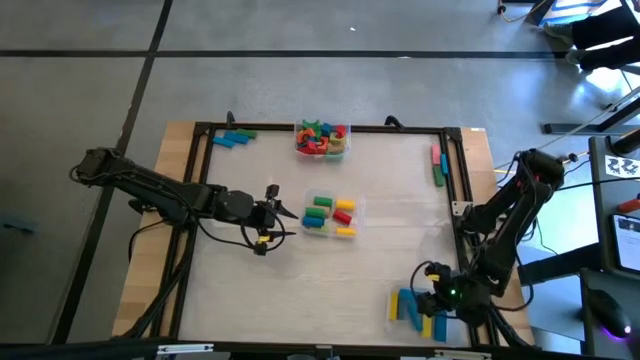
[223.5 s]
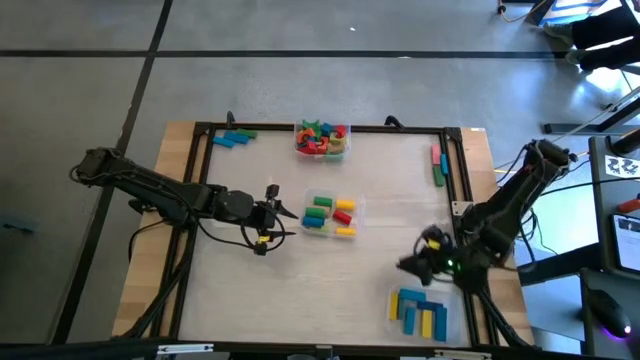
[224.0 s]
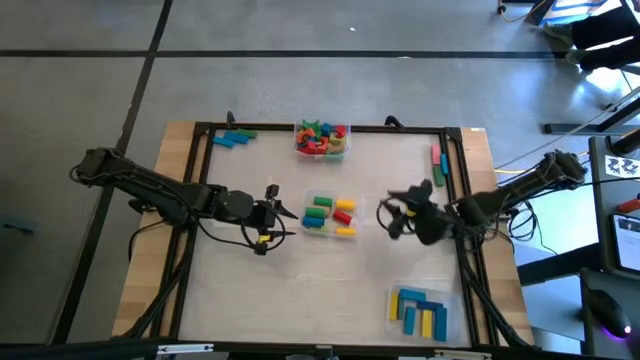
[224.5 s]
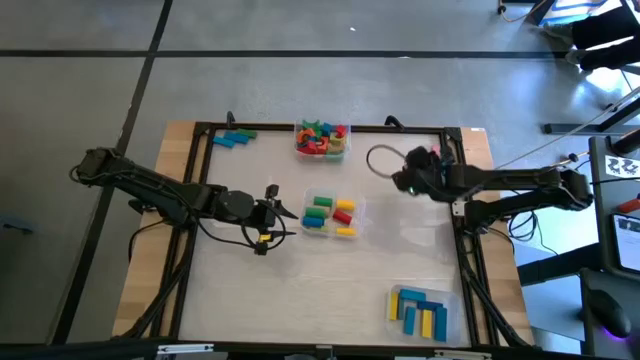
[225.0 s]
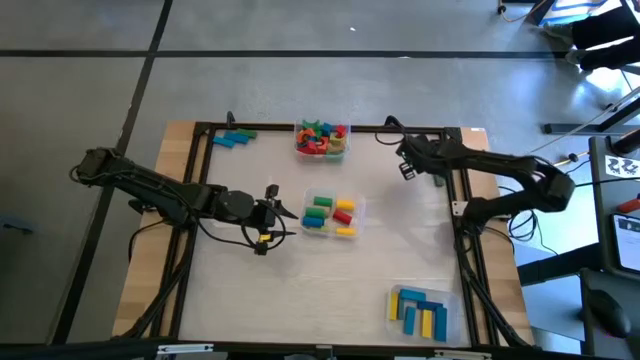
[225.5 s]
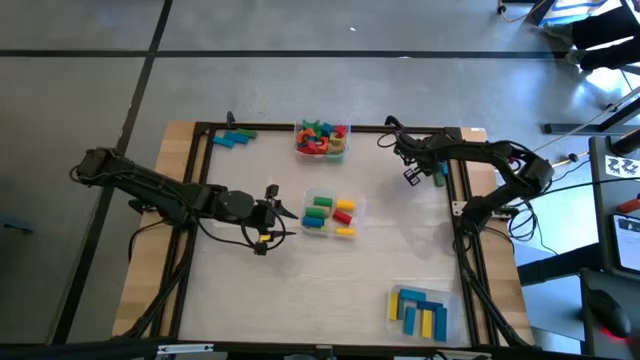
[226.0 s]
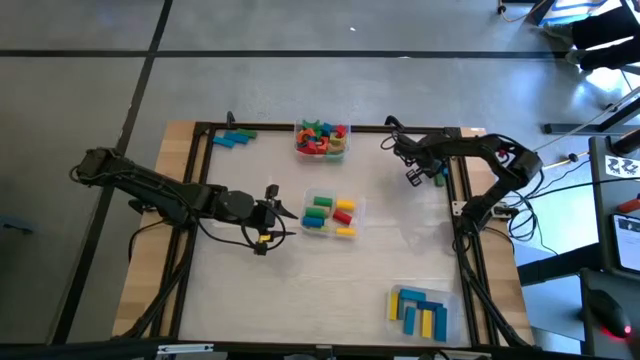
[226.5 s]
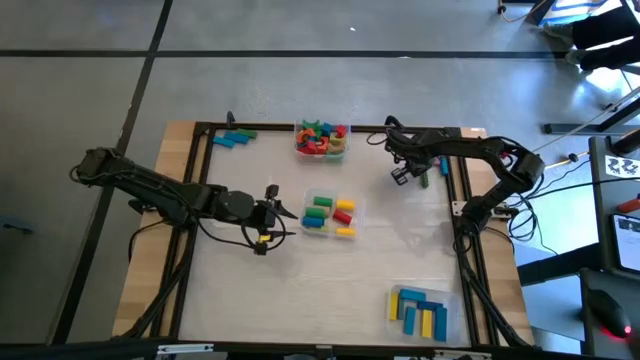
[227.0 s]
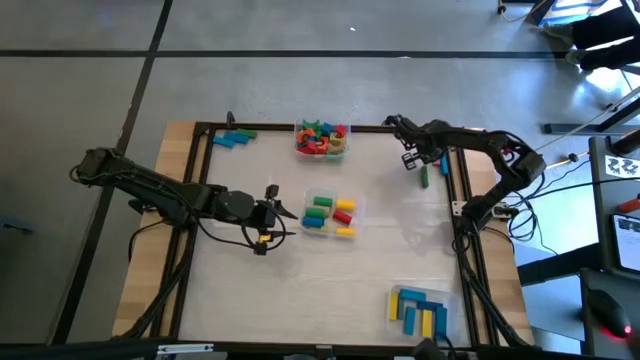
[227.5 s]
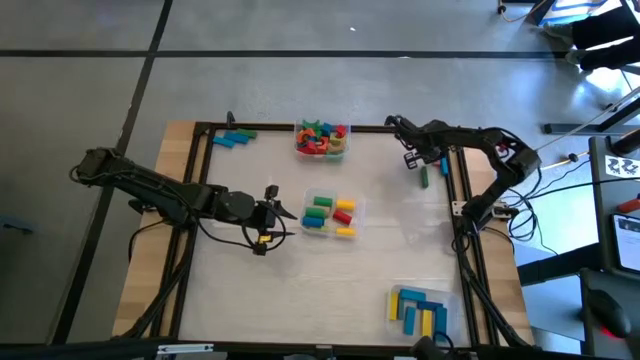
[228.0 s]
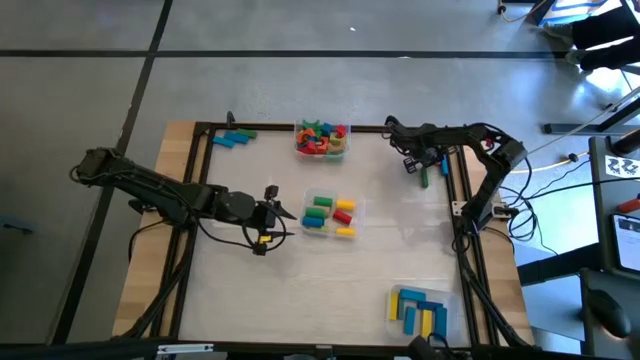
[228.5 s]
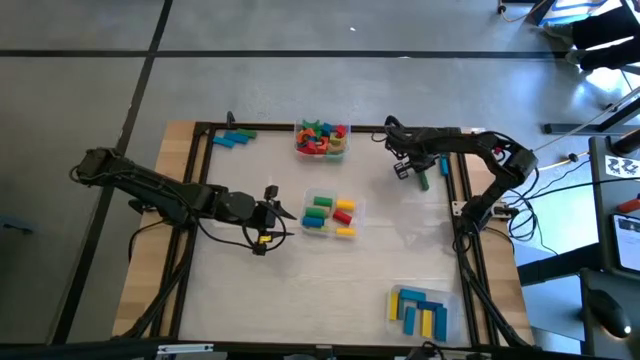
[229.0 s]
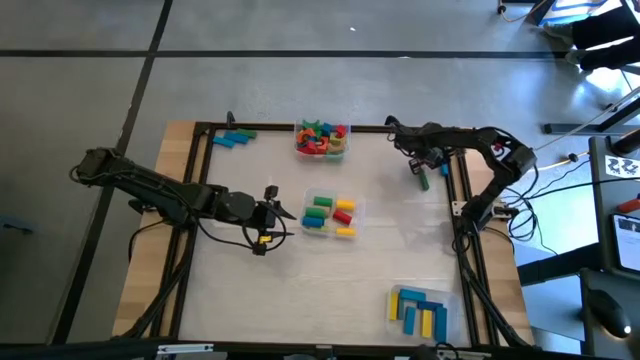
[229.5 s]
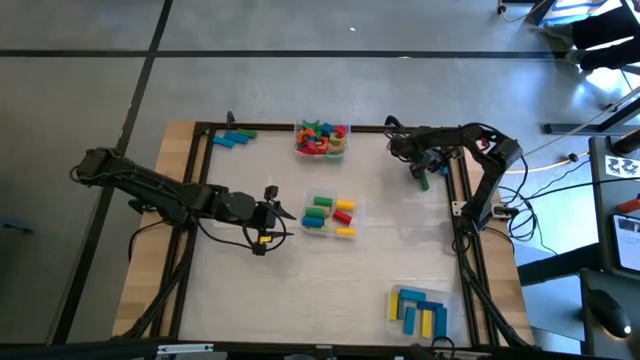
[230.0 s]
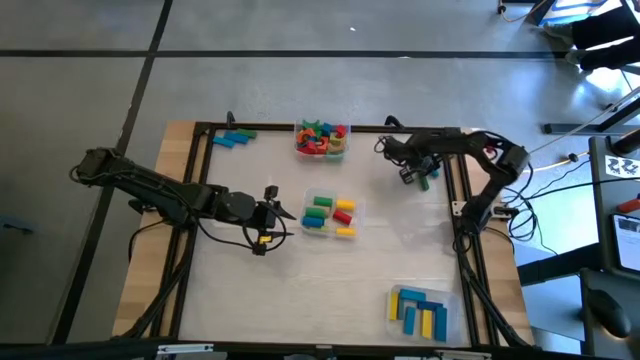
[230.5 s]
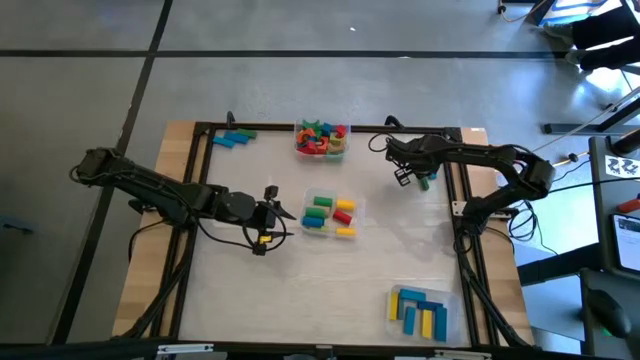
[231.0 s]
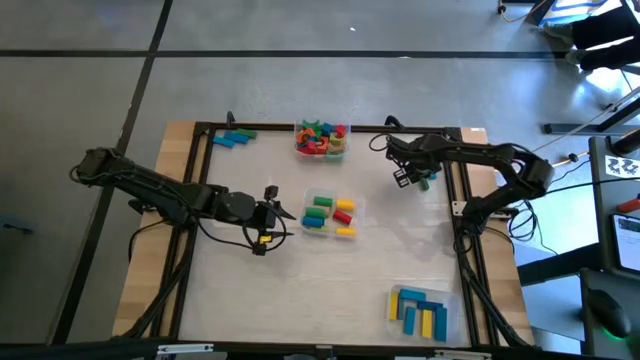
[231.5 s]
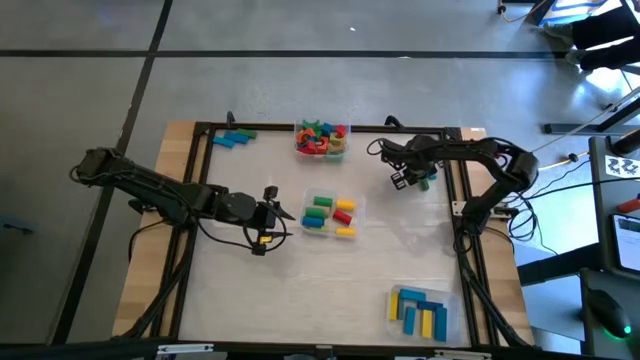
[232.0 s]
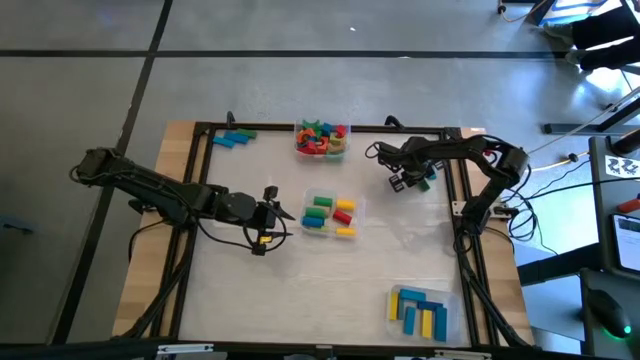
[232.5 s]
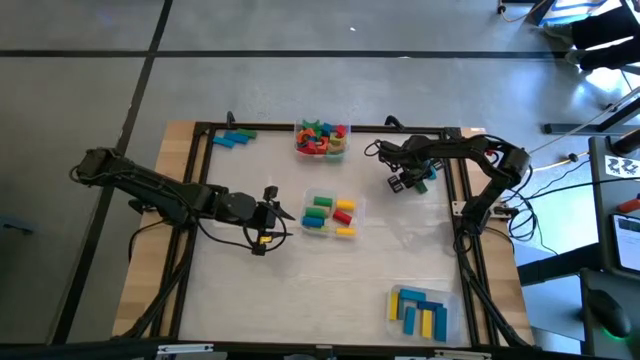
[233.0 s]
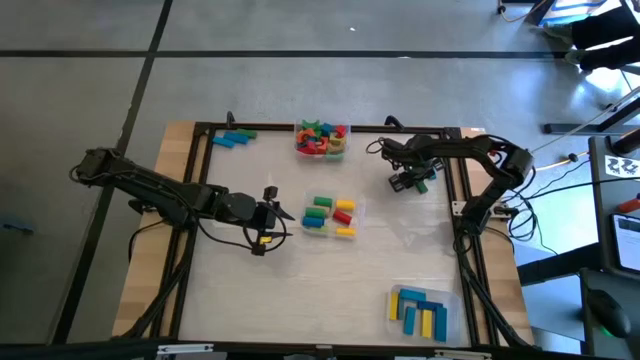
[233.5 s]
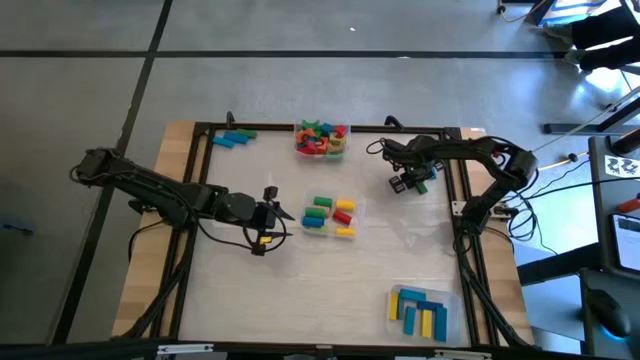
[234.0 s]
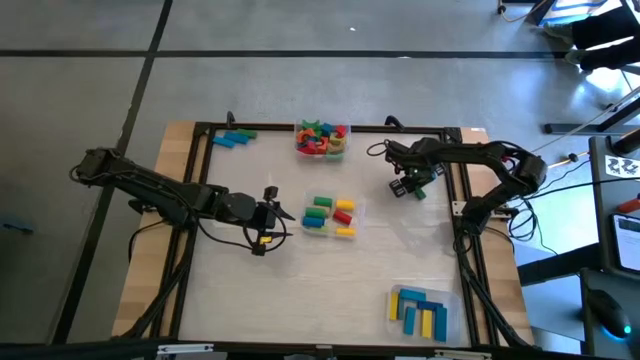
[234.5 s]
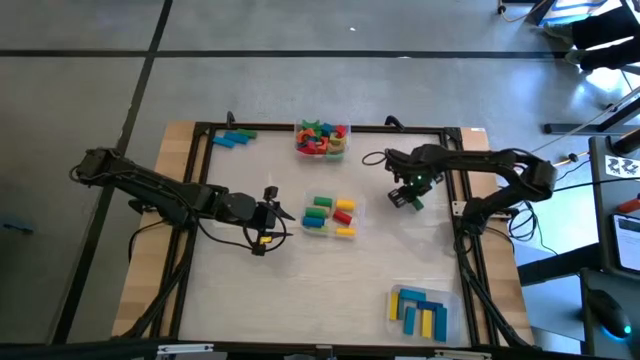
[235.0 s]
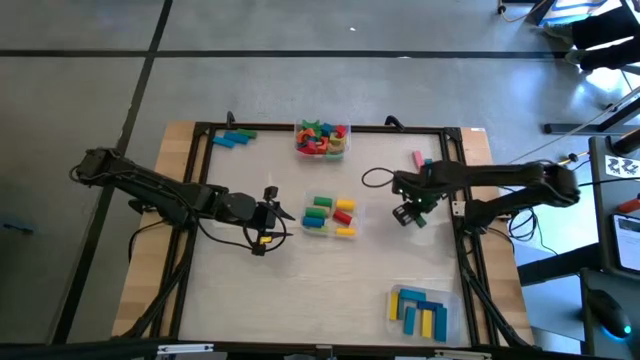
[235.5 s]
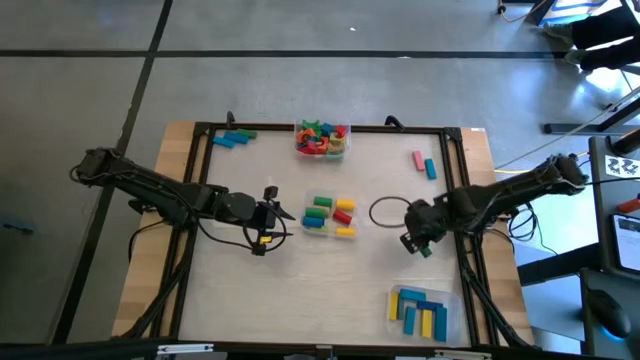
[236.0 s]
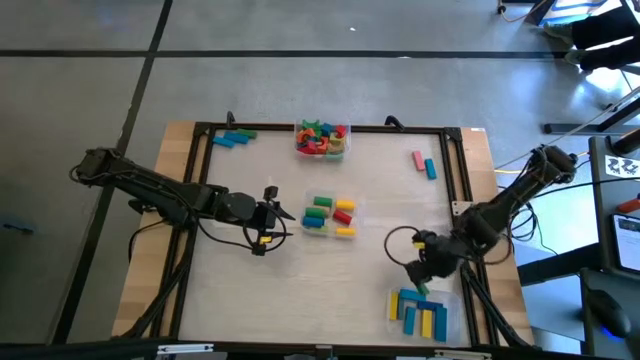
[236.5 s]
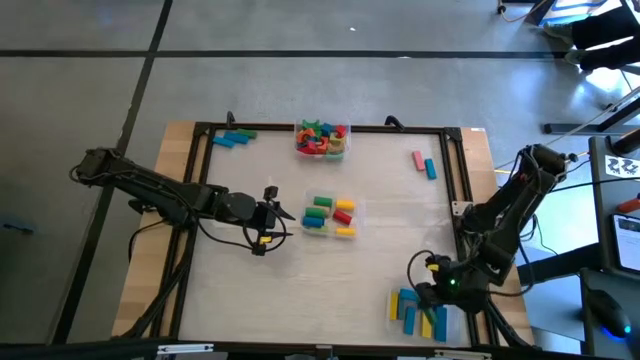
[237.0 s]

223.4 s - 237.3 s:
Task: Sort blocks by size
Put the green rectangle block into the bottom transparent bin

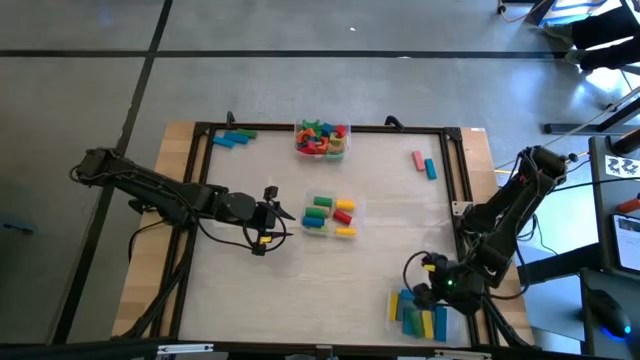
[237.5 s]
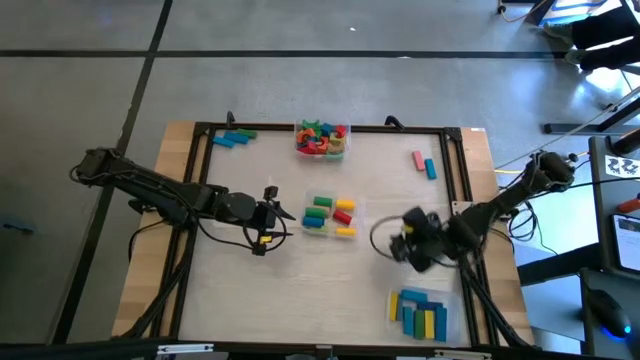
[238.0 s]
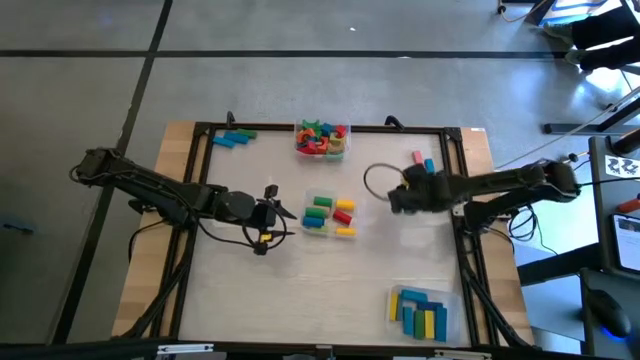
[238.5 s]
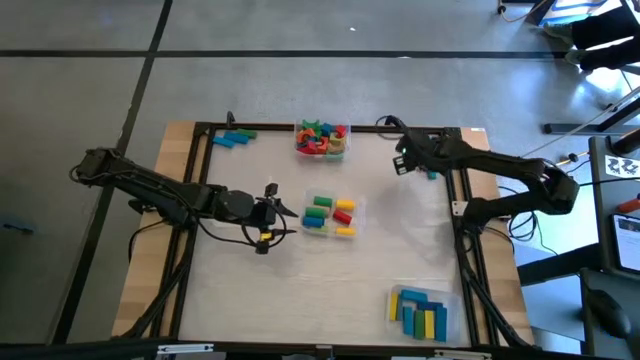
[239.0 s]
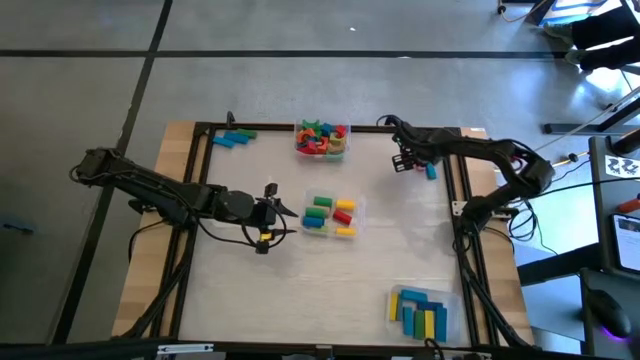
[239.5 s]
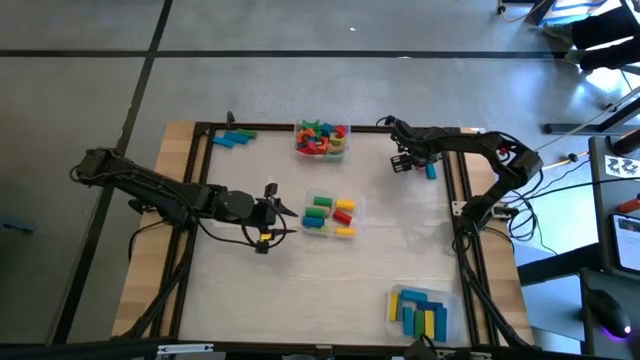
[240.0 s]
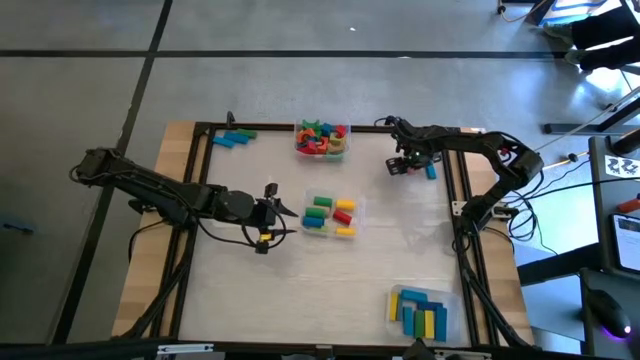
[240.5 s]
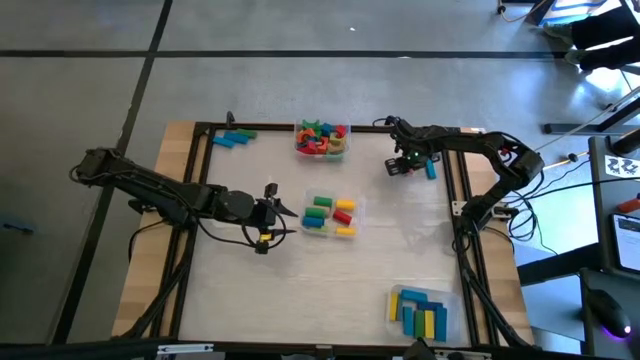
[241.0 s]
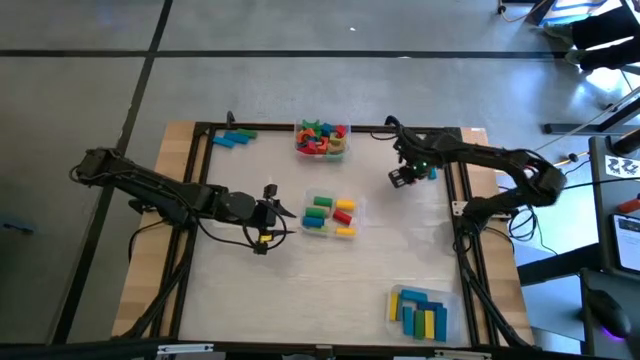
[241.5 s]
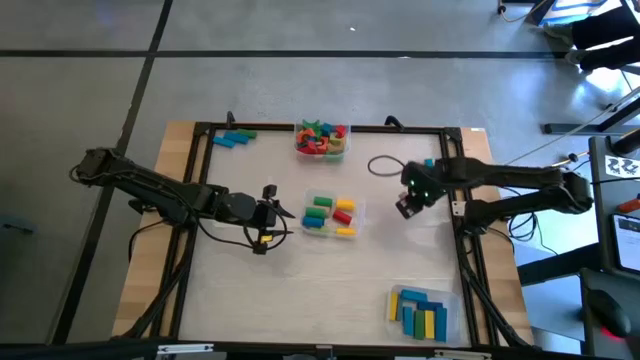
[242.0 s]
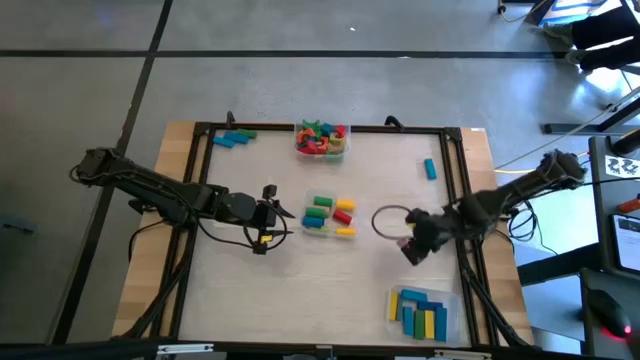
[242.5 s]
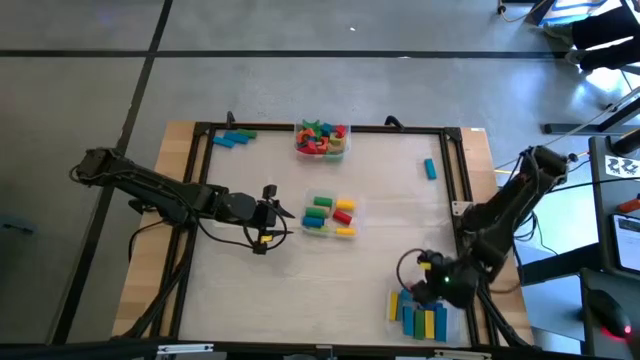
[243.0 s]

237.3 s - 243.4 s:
Put the pink rectangle block into the bottom transparent bin

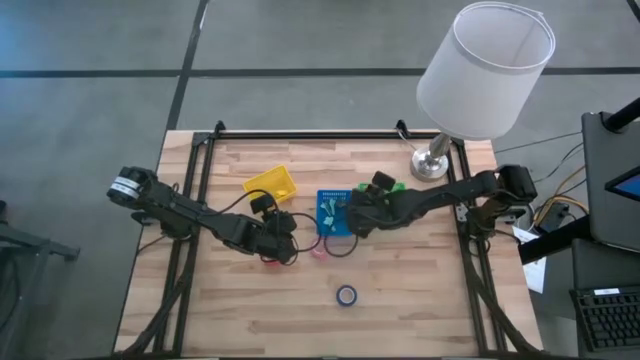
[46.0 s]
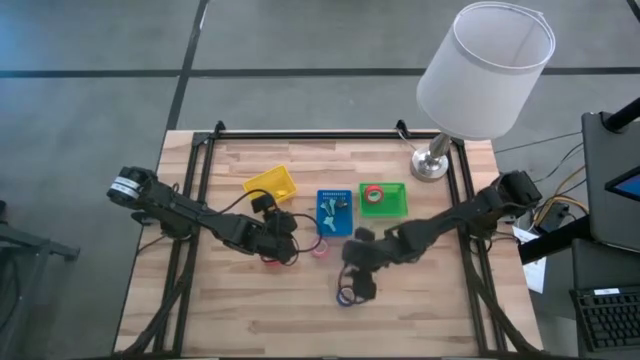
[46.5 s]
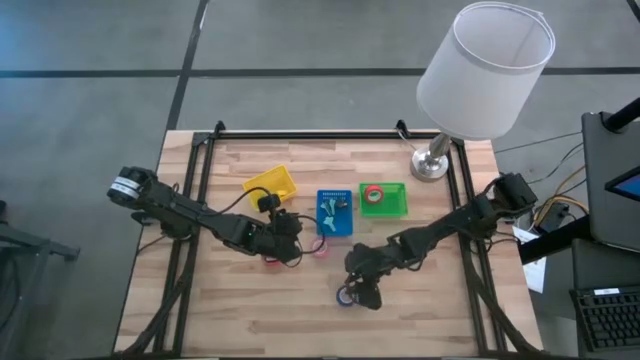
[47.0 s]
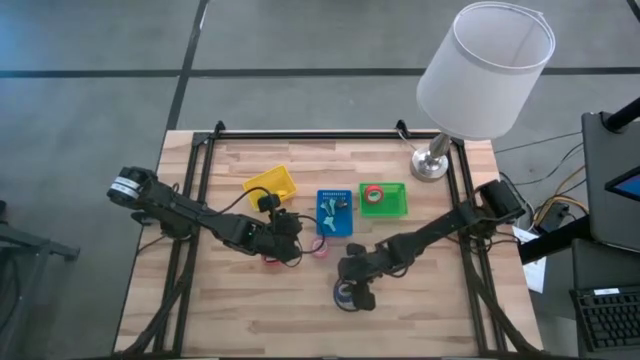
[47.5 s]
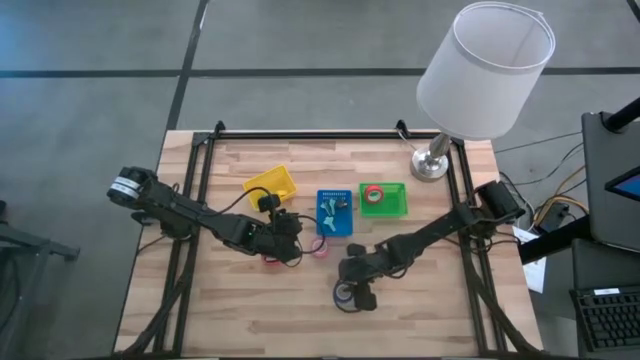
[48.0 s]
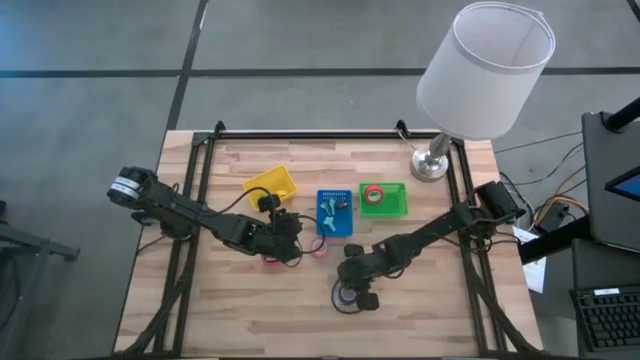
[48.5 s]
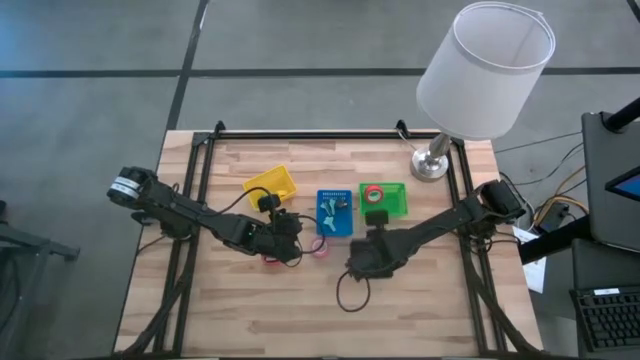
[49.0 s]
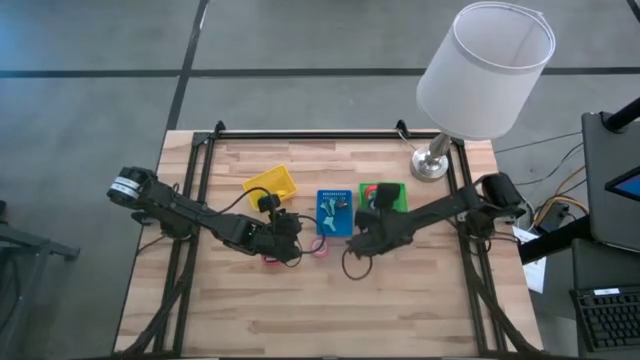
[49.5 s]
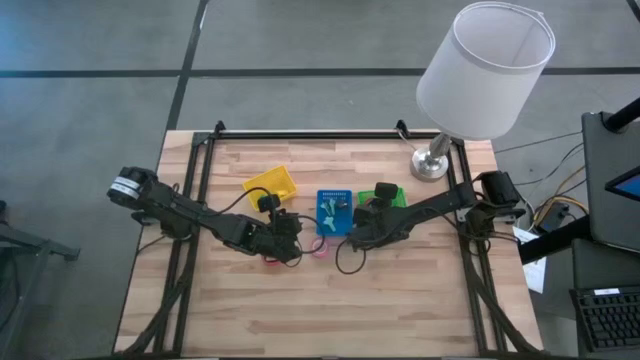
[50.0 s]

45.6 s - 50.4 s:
Task: Pick and place Stapler, Stapler remover, tape
Put the blue tape into the green basket
